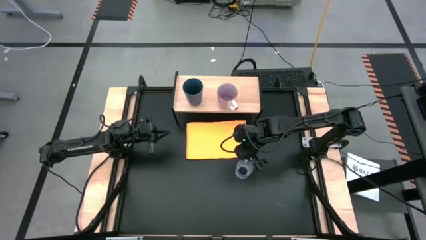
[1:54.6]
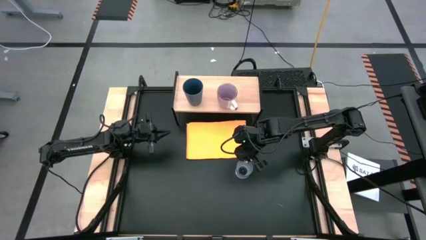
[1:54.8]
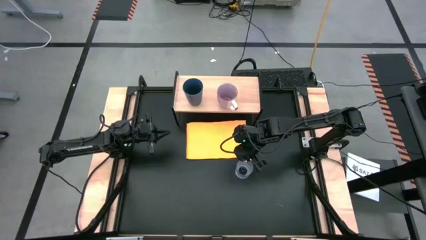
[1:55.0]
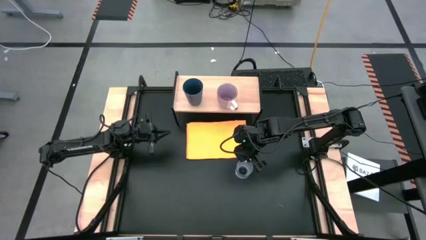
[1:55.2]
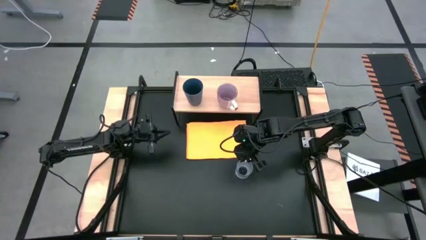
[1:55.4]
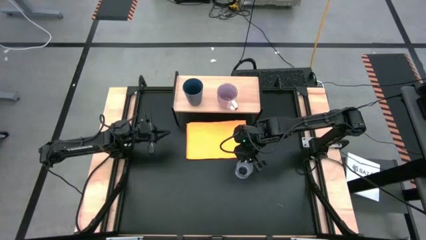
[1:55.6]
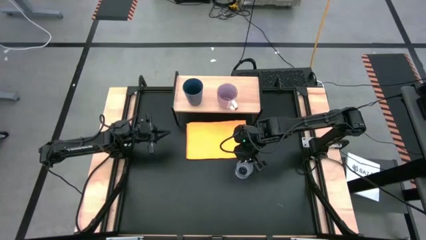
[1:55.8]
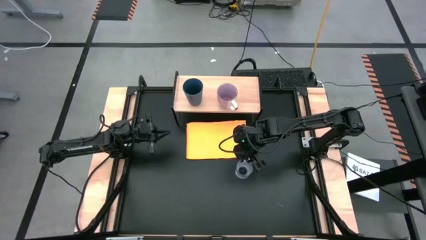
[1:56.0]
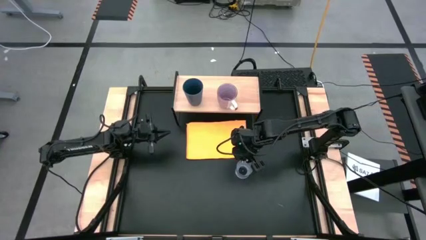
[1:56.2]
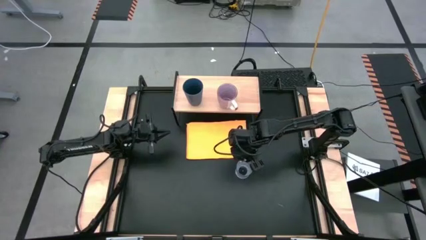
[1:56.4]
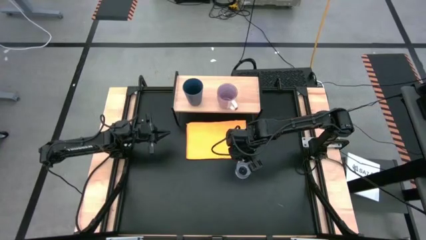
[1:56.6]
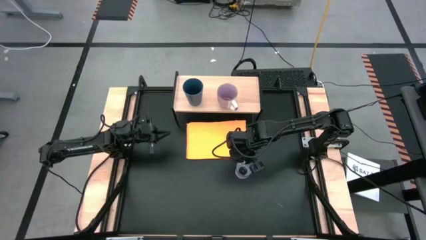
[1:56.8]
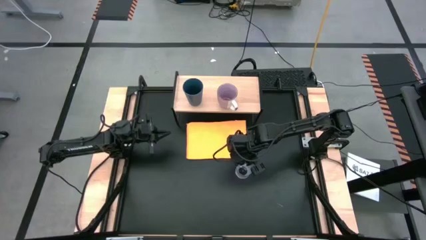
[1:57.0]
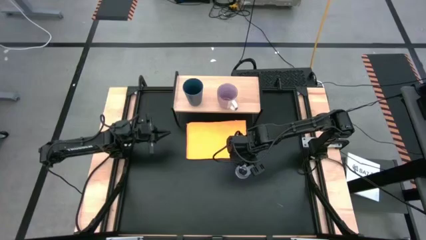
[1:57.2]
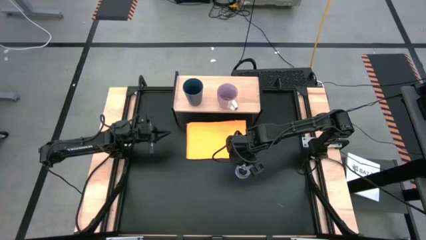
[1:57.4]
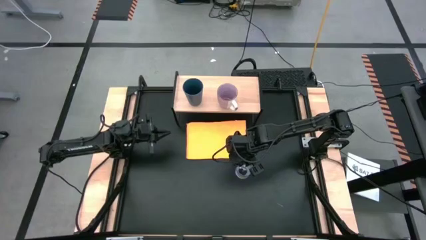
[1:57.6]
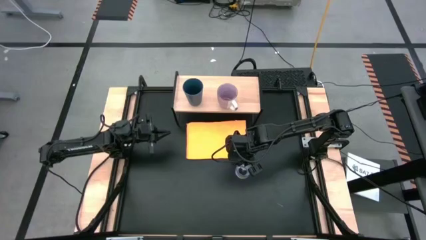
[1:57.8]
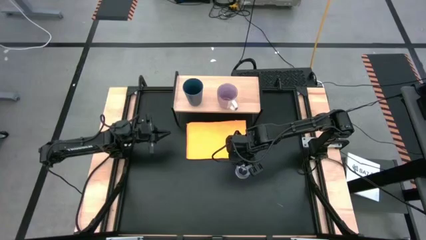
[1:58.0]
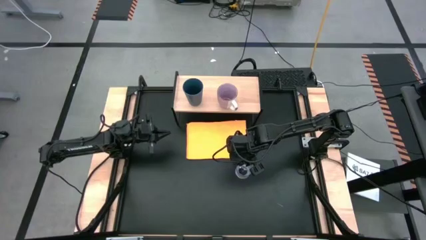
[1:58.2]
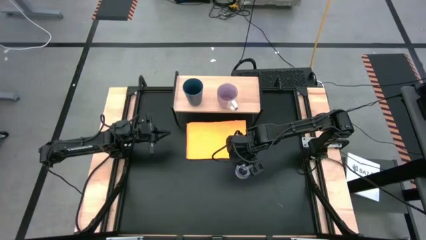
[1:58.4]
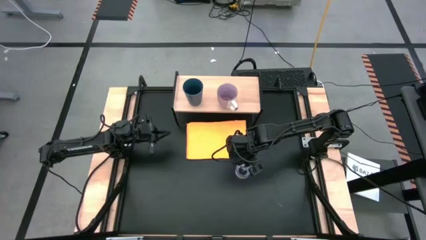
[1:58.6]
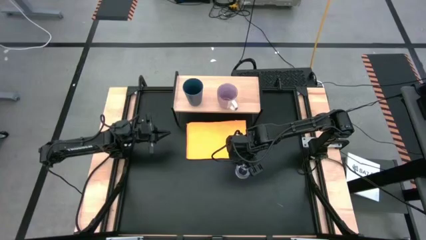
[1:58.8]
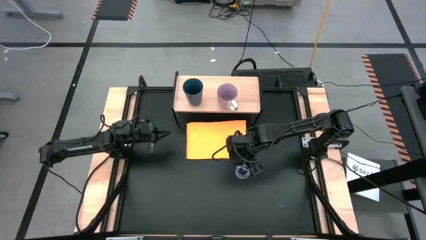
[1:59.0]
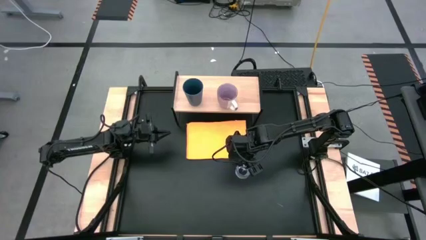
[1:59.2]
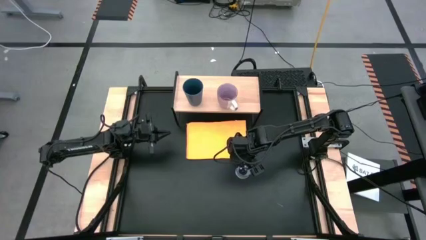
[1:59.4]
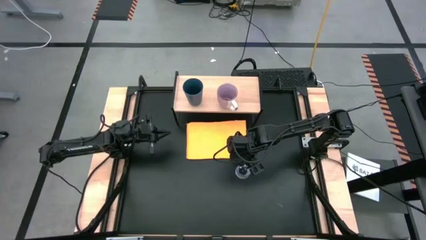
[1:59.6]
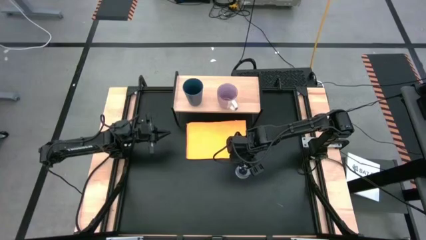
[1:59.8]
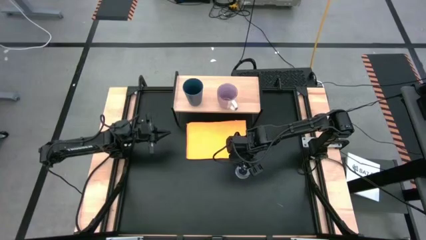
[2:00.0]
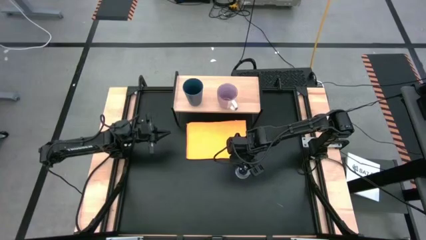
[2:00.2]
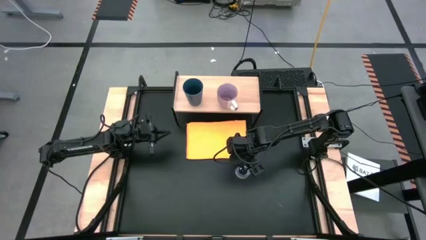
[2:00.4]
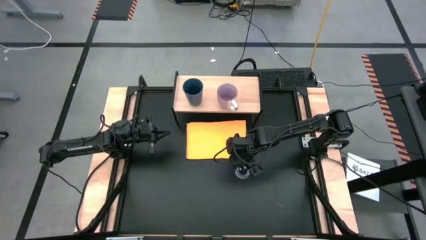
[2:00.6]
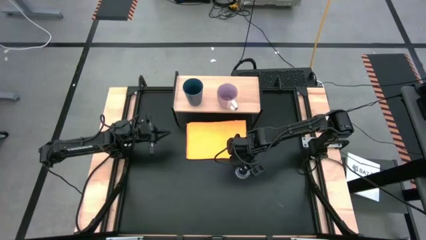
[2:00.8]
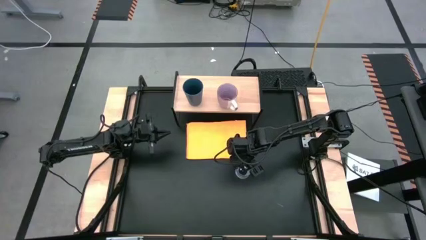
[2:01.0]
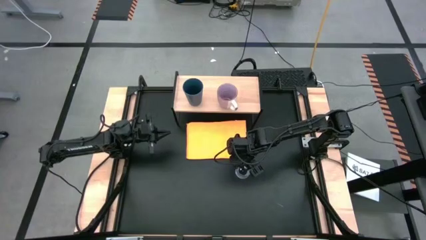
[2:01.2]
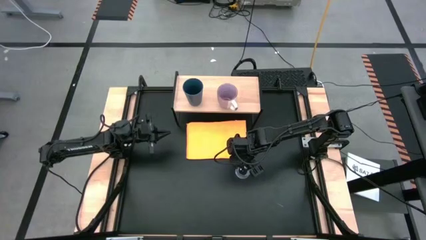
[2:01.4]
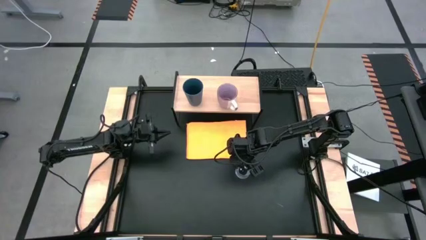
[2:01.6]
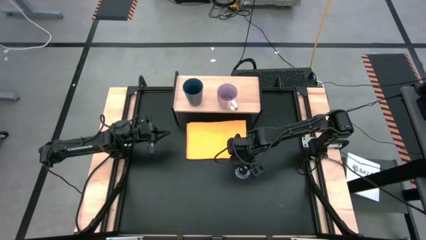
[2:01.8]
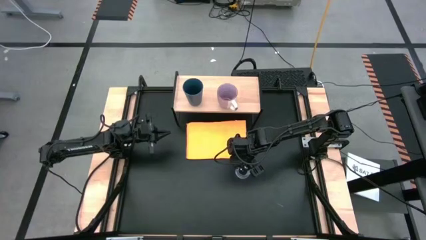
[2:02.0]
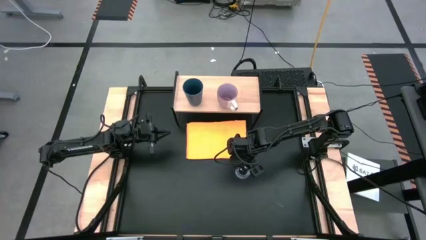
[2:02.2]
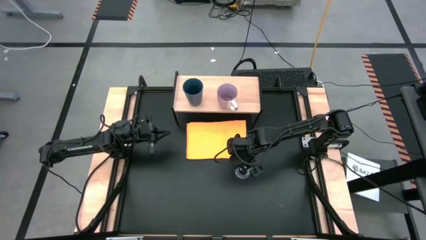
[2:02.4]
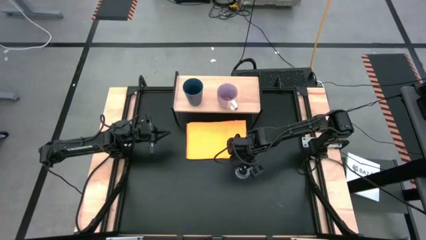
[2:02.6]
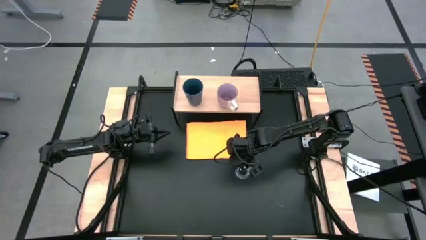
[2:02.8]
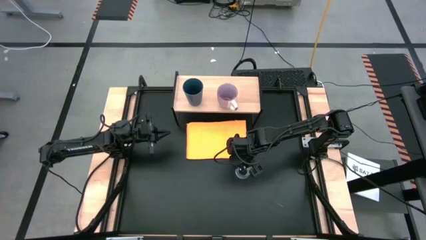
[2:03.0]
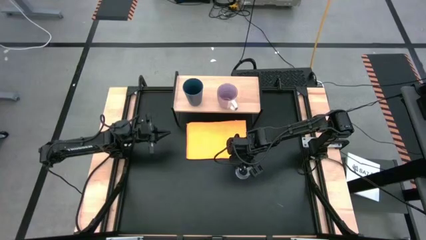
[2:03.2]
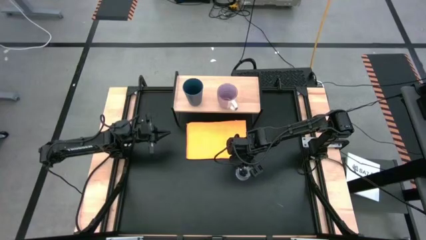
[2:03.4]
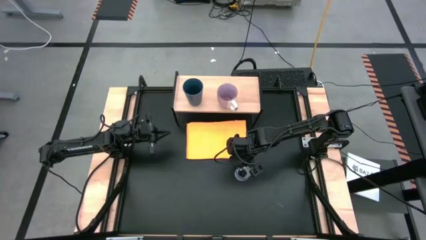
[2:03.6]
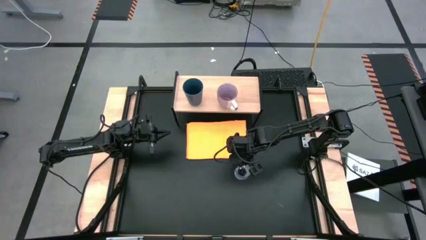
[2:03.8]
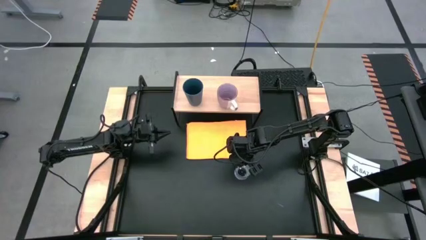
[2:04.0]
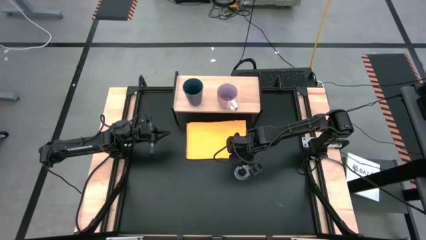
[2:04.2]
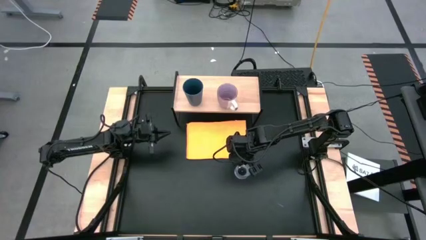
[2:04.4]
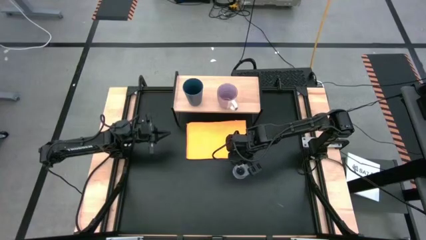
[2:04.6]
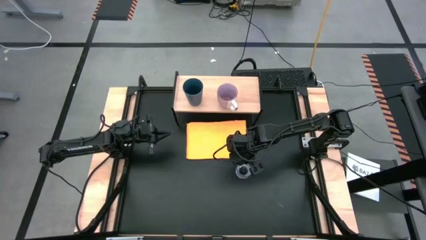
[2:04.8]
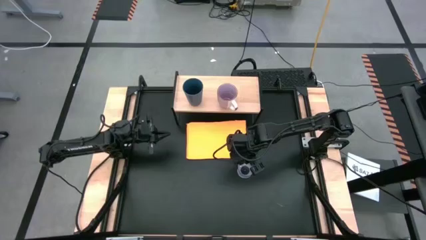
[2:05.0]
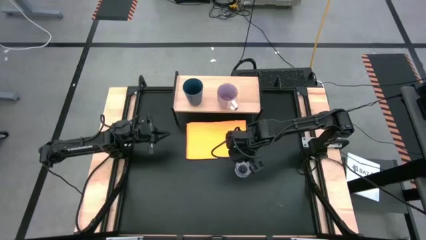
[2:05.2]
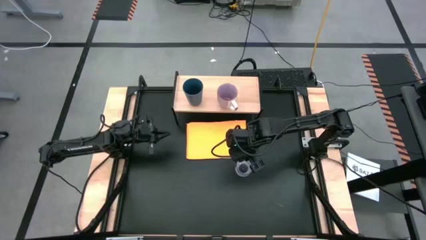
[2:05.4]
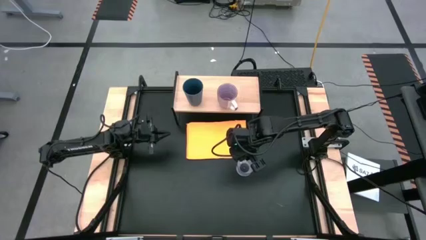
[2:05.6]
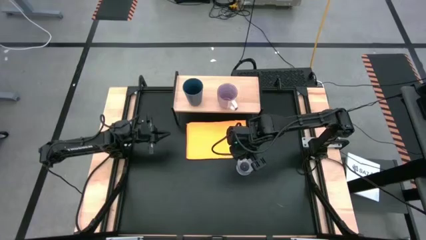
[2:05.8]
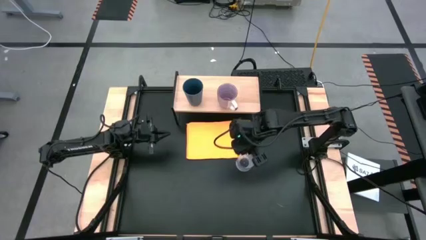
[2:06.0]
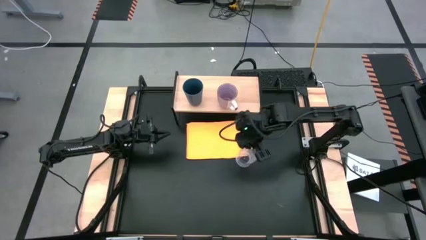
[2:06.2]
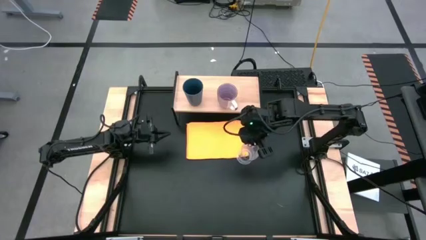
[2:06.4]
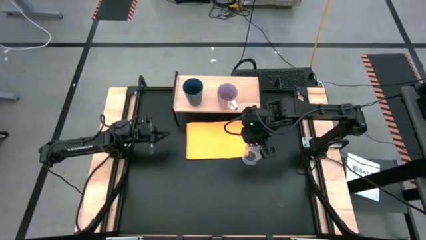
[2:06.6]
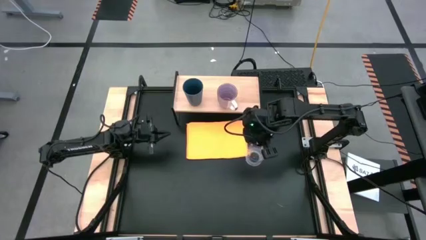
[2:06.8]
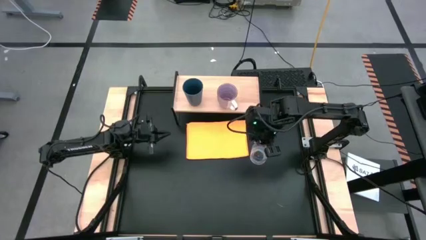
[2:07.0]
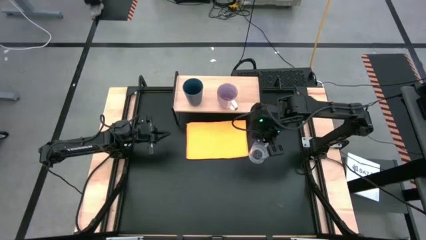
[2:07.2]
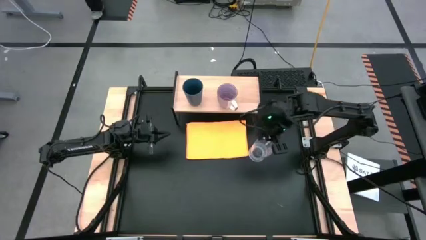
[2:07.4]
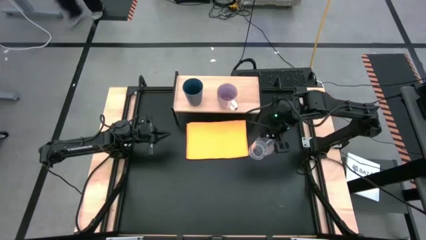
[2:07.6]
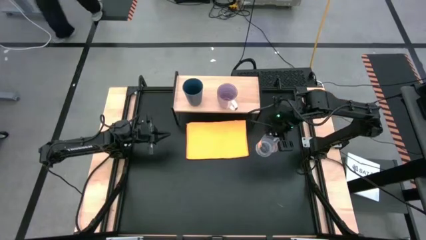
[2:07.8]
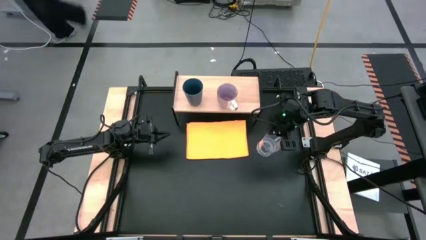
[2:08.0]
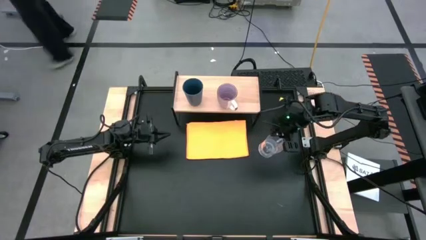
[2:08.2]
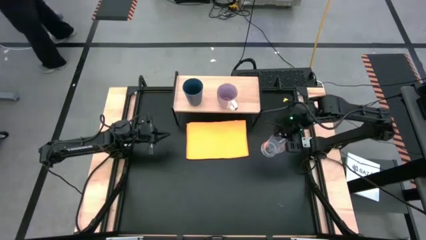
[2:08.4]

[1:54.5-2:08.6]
Task: Stack small to large cups/mugs on shelf
Put the transparent mug on the shelf

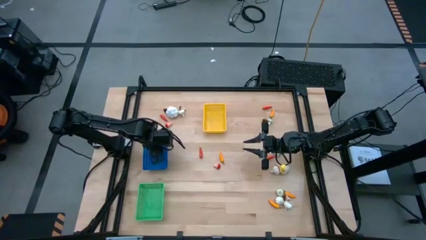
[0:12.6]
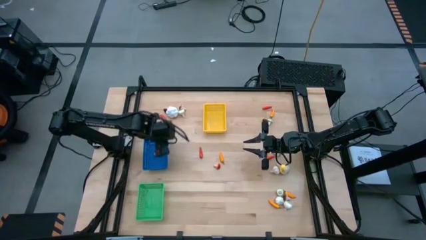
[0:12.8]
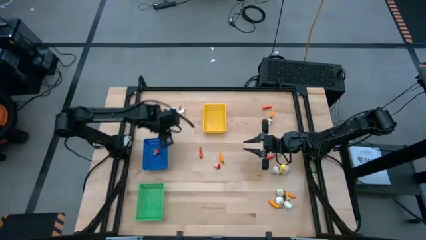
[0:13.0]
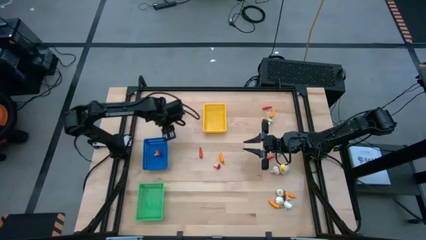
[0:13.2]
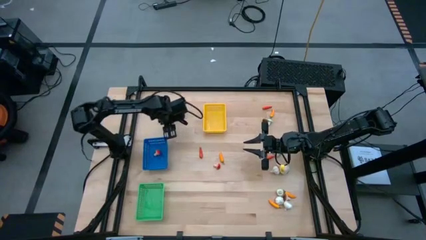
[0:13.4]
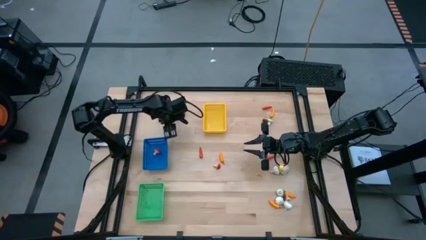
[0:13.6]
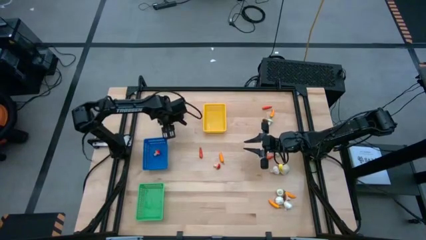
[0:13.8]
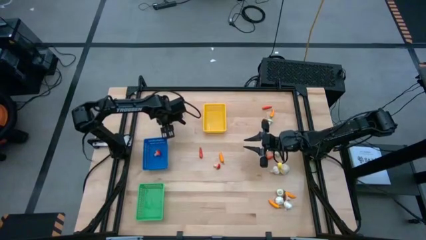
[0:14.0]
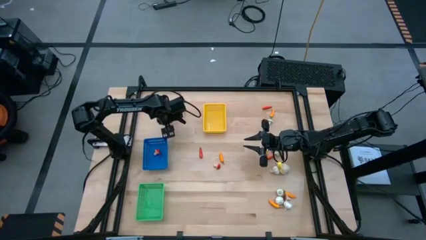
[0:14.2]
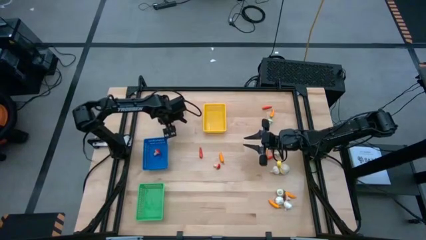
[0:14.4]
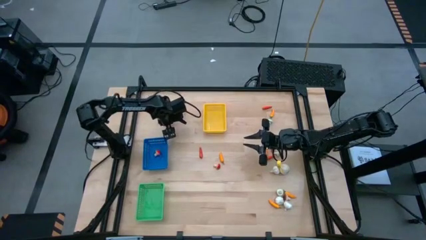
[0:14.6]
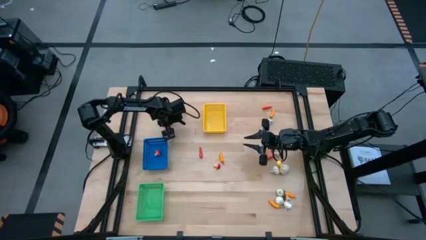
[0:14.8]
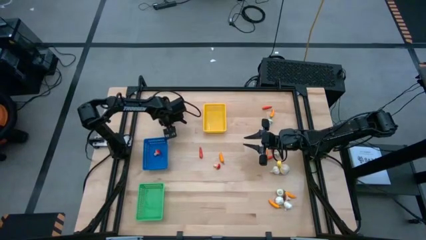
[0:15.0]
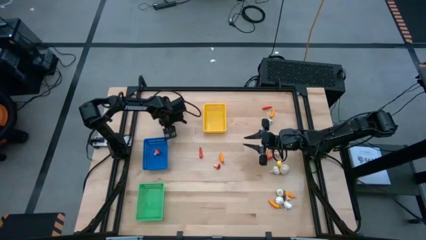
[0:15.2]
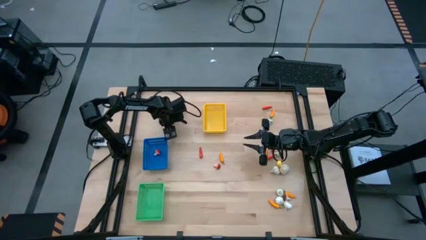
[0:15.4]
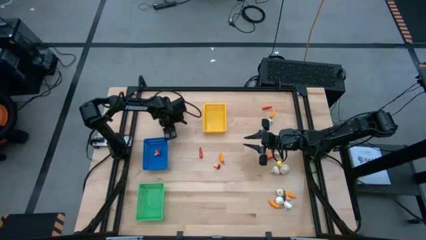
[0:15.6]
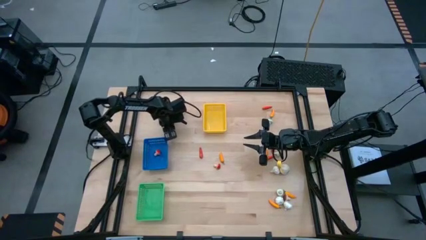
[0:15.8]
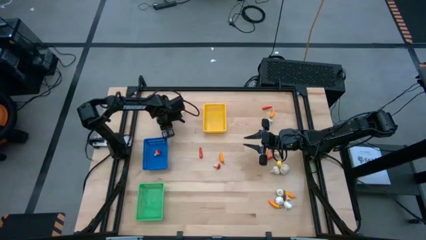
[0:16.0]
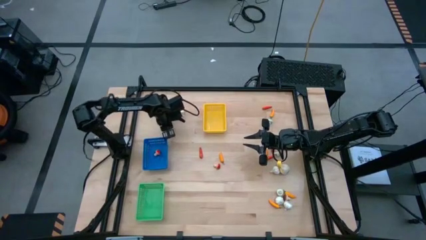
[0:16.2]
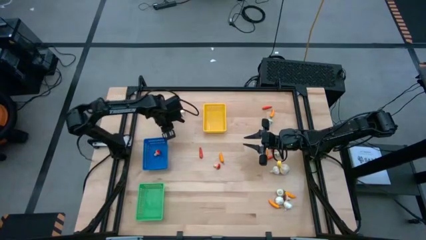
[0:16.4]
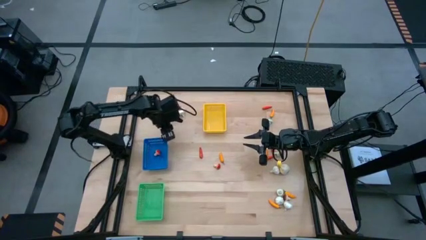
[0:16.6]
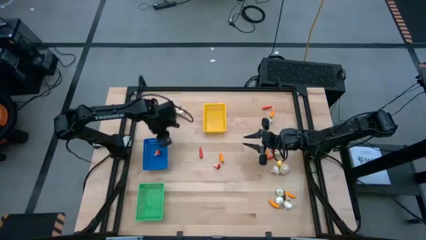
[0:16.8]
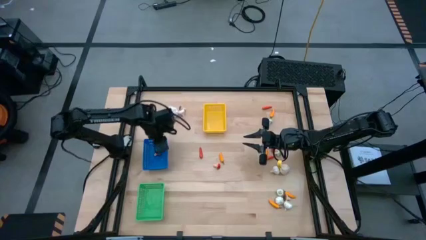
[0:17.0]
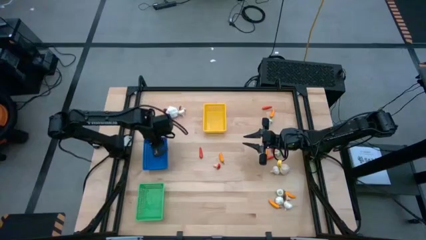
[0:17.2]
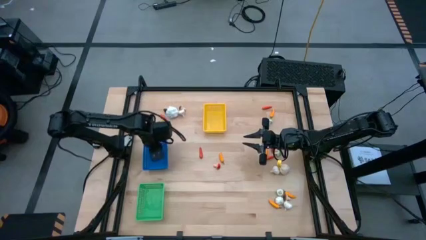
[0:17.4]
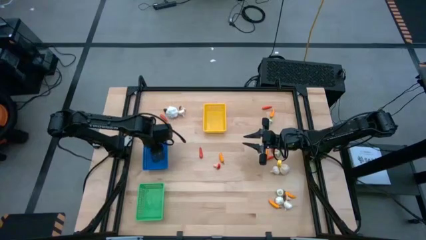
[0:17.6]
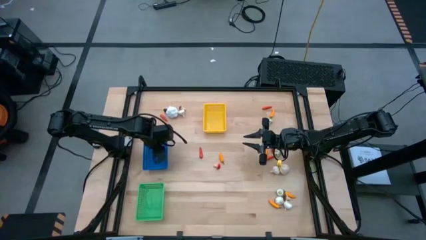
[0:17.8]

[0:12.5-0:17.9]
Task: Sort produce into baskets
Put the orange mushroom into the blue bin
